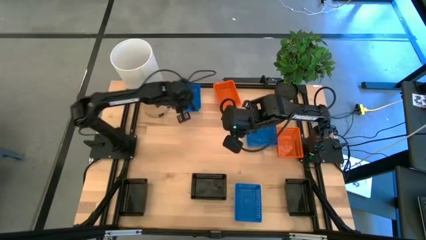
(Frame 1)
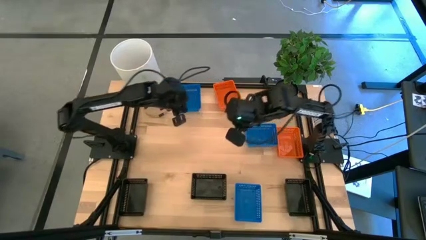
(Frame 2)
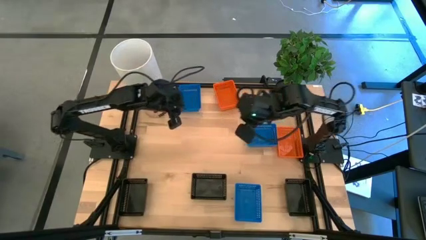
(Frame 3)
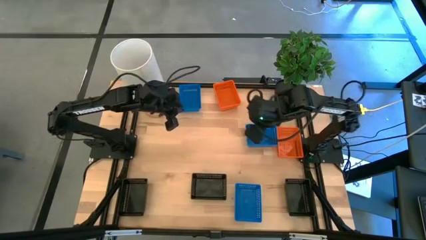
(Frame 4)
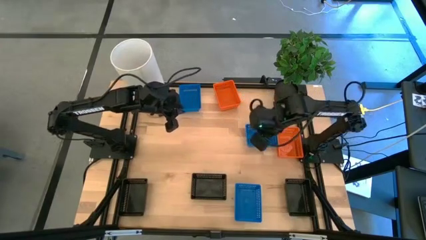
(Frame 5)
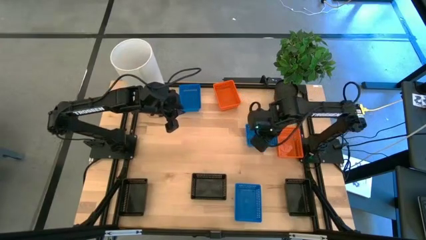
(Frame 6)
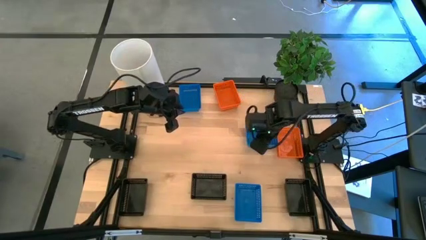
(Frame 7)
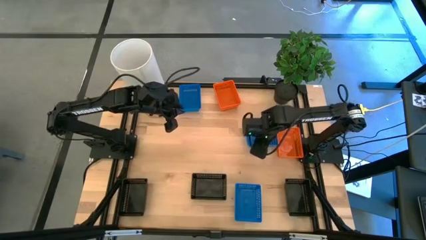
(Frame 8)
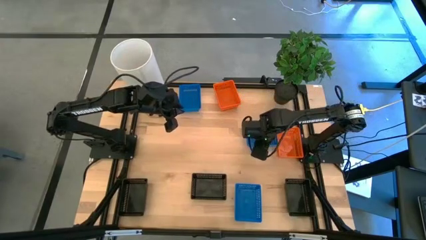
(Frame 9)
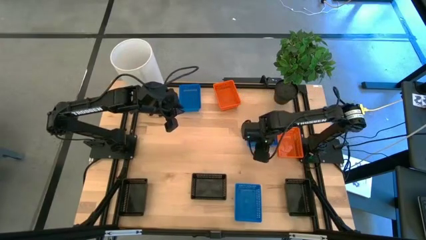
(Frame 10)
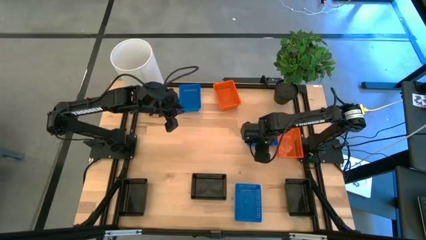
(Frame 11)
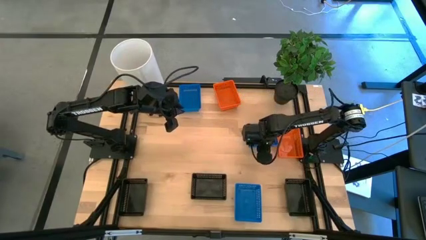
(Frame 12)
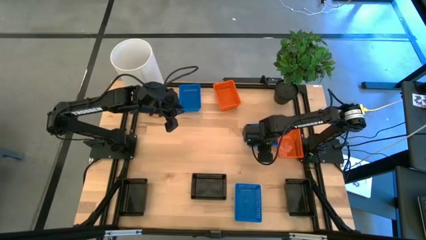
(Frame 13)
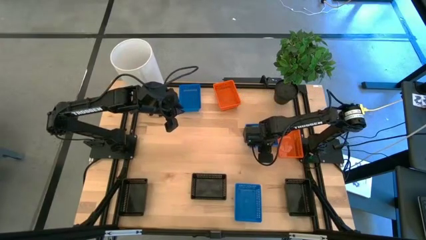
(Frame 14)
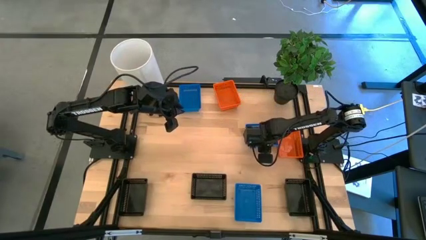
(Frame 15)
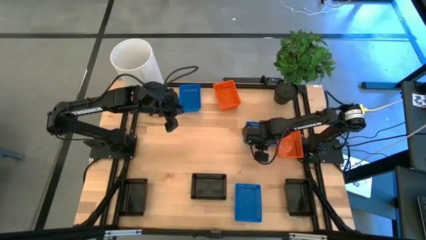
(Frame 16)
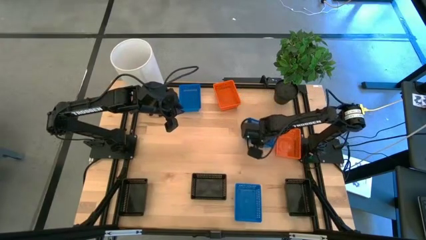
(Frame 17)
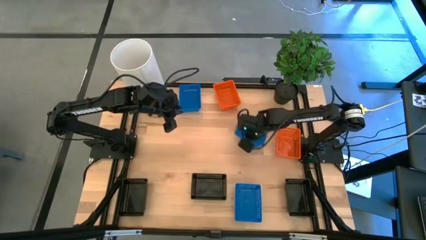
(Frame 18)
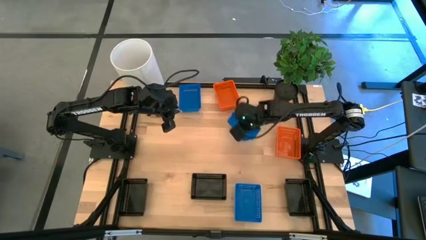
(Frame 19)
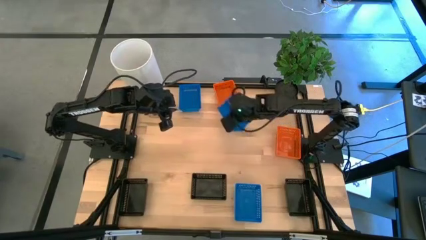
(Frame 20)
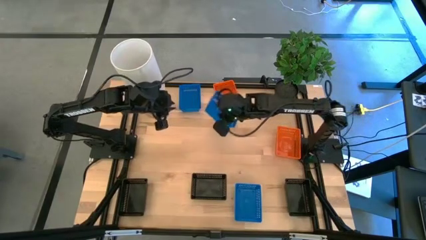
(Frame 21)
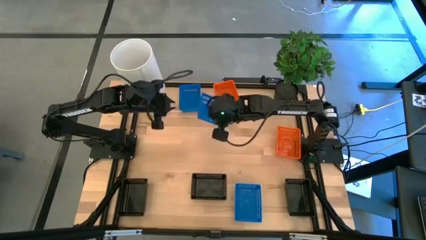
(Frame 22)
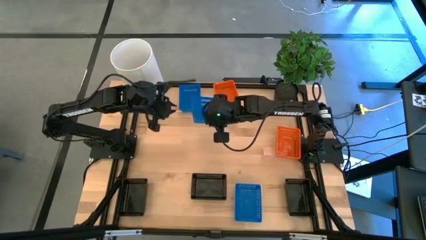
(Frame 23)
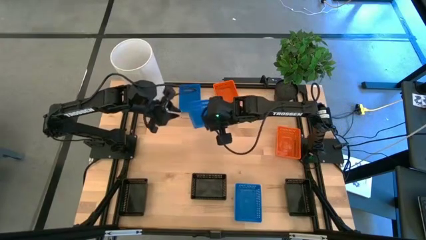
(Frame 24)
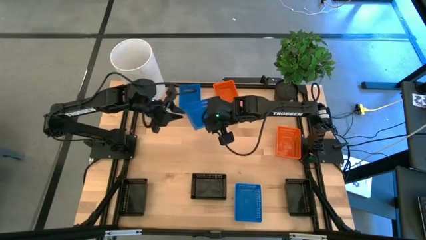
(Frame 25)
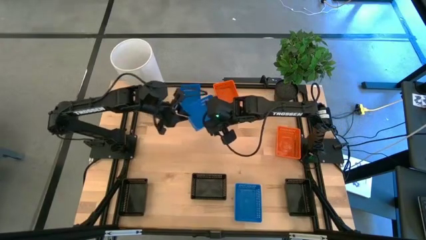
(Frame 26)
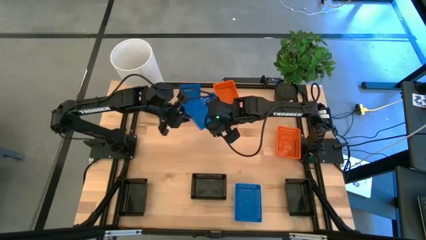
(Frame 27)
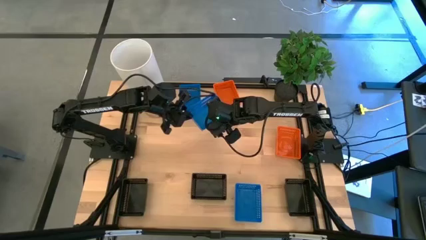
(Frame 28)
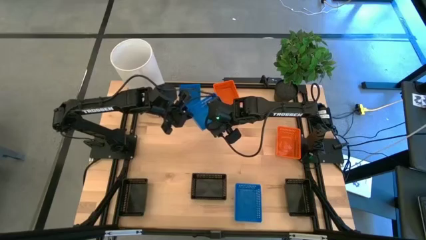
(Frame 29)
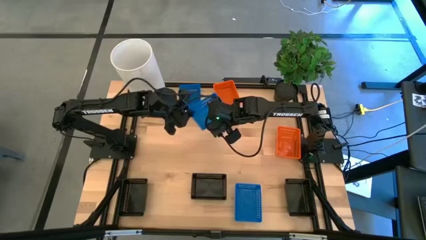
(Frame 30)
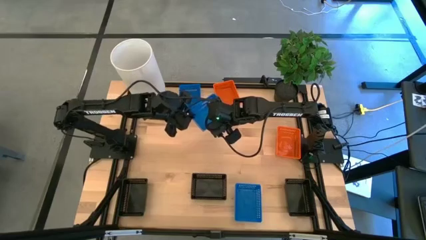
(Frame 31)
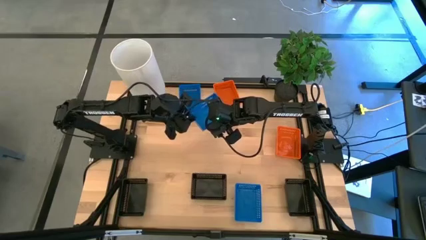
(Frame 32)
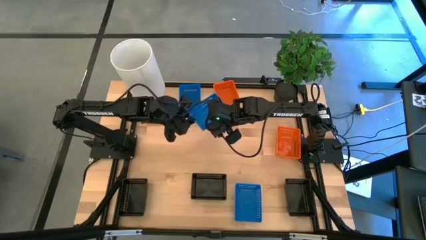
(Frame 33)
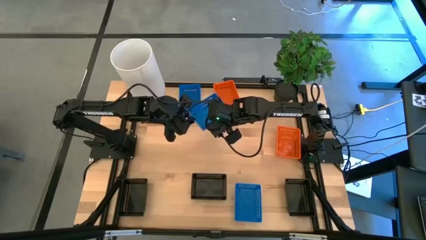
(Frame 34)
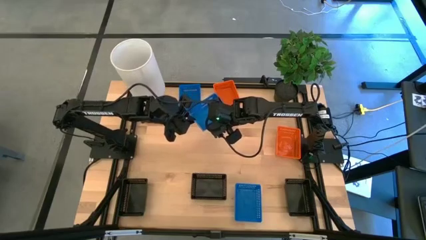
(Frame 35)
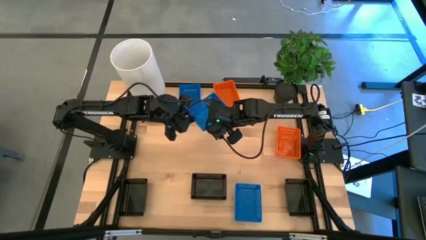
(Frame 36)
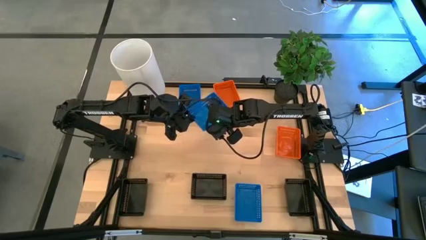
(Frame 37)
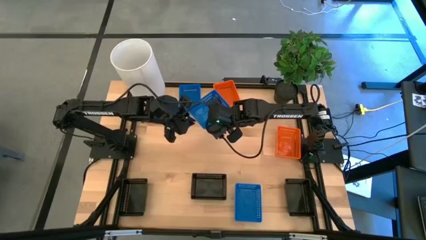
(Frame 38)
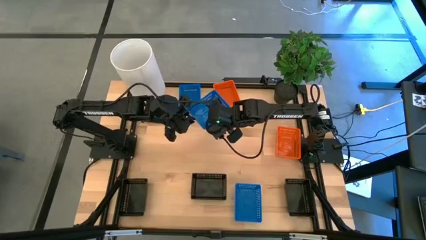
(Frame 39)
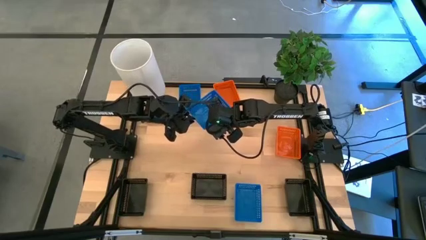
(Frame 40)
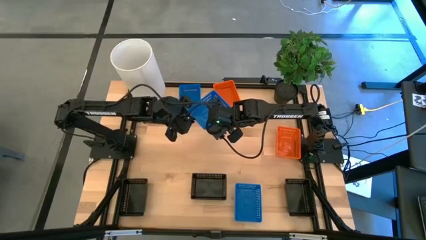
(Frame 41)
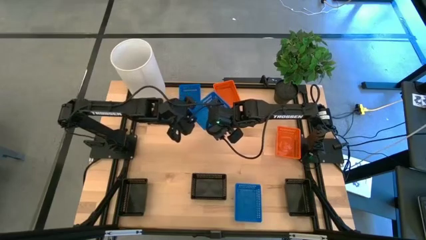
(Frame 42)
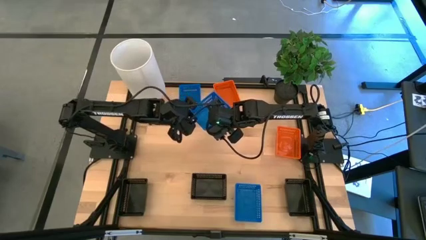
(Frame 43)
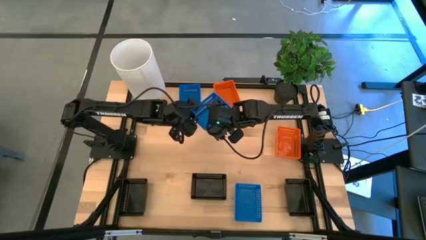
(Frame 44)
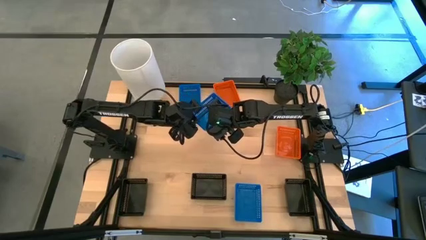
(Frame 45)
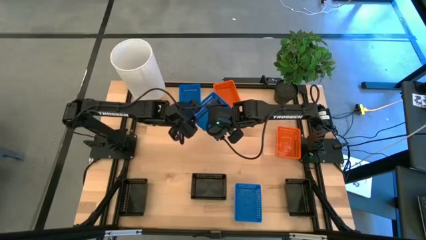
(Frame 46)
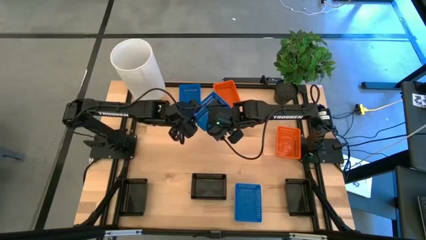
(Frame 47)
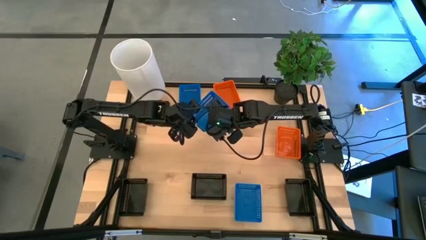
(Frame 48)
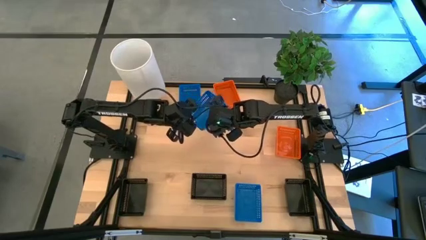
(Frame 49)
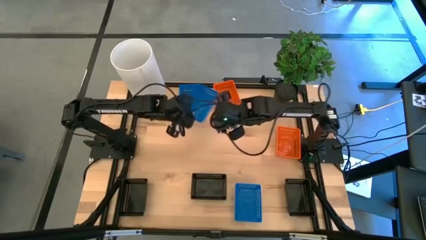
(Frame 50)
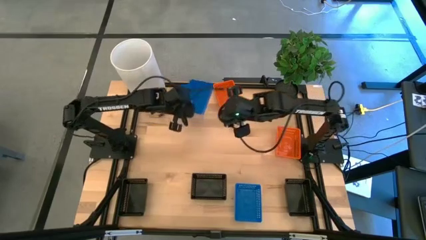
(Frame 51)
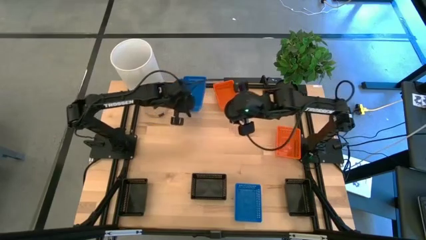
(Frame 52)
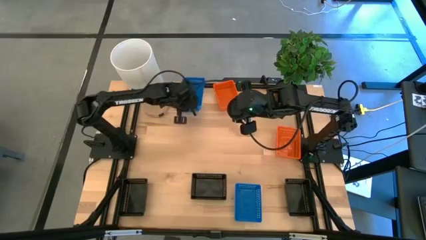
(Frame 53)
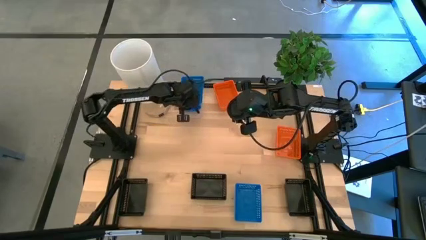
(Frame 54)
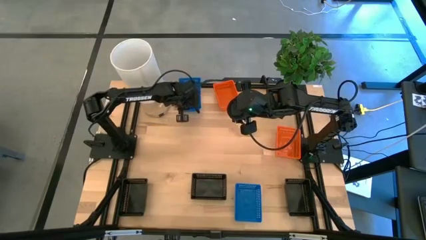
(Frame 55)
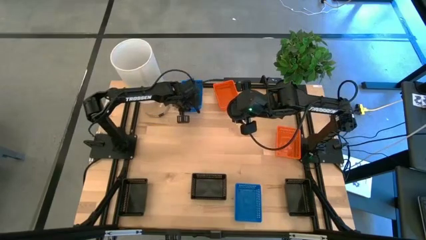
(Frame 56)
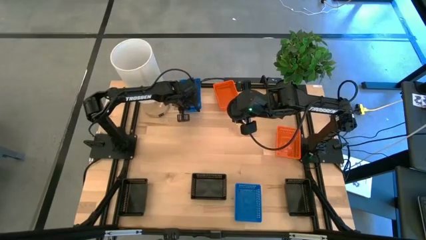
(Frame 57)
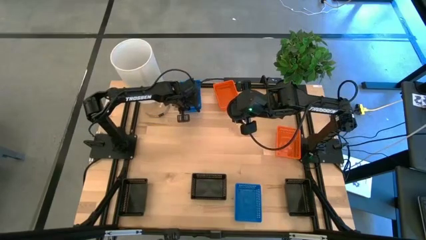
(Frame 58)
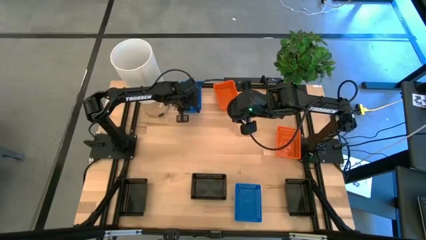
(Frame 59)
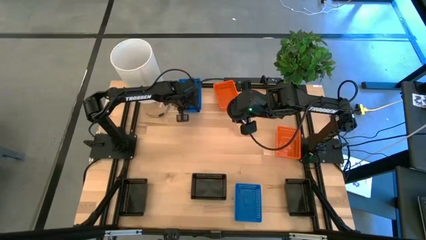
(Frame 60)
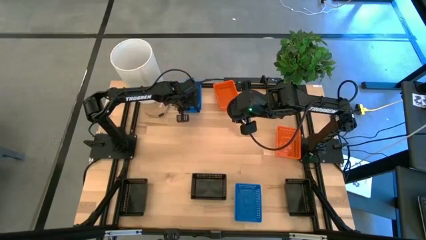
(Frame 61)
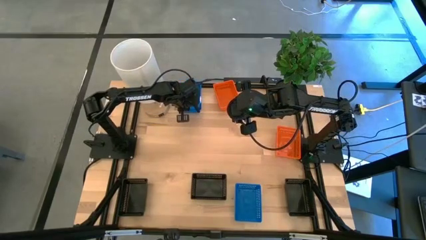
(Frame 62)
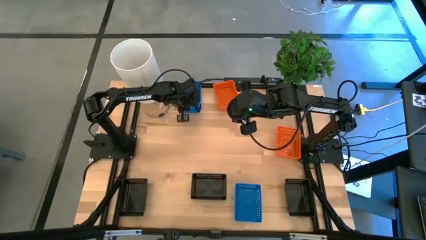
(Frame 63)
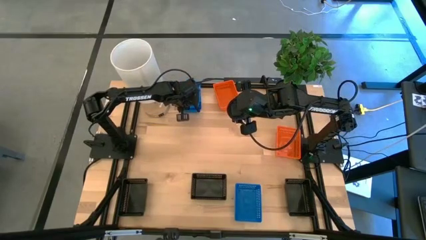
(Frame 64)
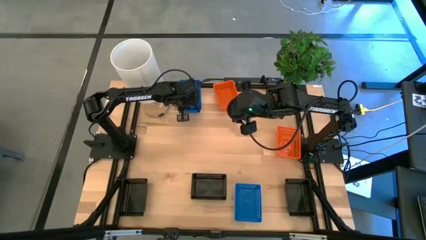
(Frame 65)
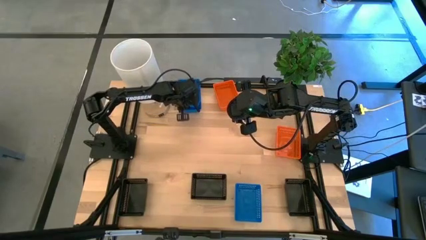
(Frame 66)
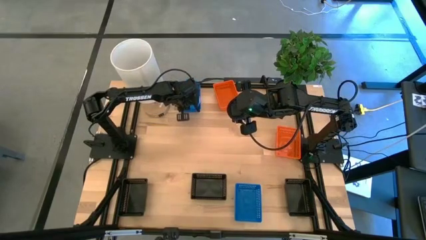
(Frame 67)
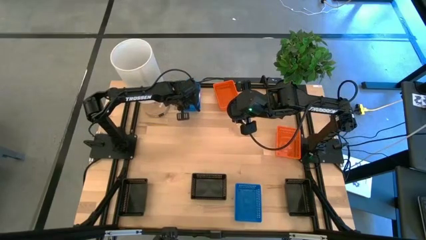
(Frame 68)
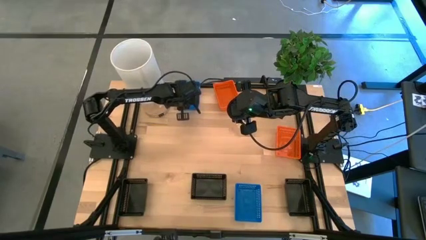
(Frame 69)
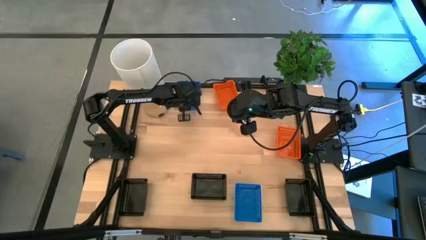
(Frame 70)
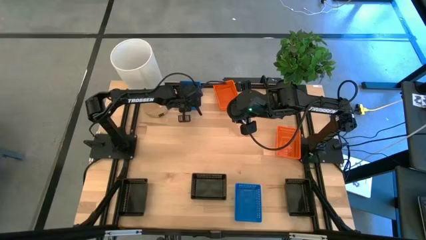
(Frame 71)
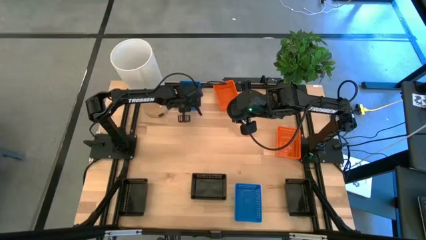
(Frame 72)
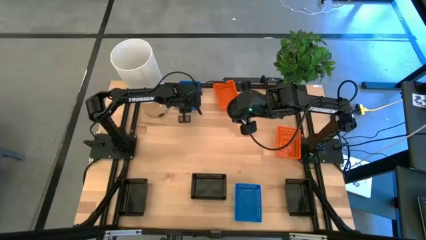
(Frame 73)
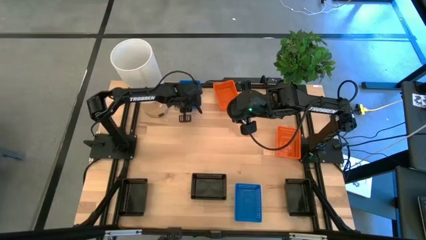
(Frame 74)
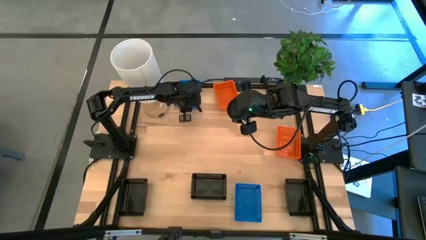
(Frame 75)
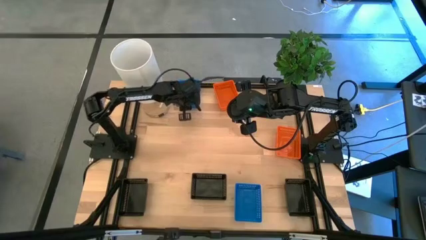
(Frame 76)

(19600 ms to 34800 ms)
Stack the top blue basket on top of the blue basket on the table
